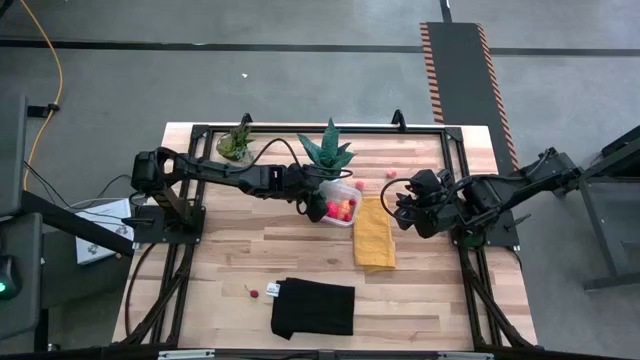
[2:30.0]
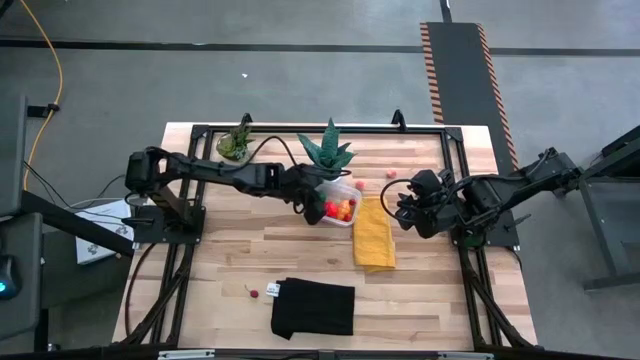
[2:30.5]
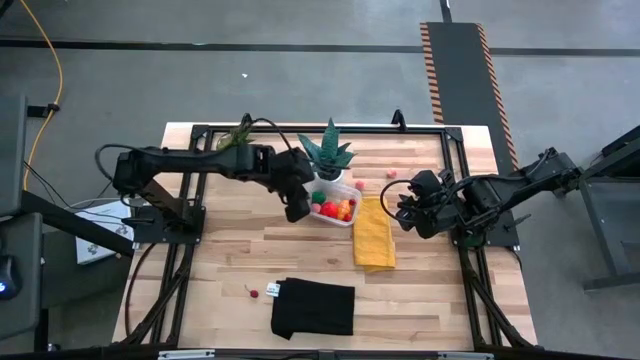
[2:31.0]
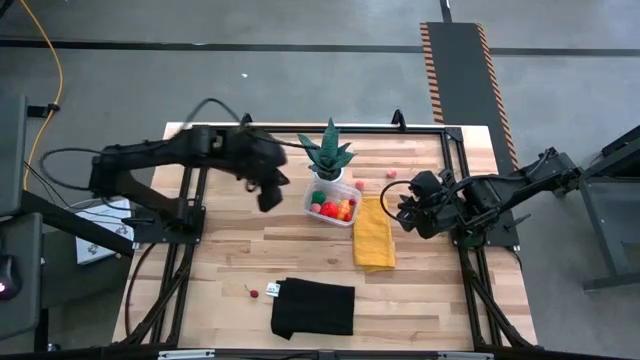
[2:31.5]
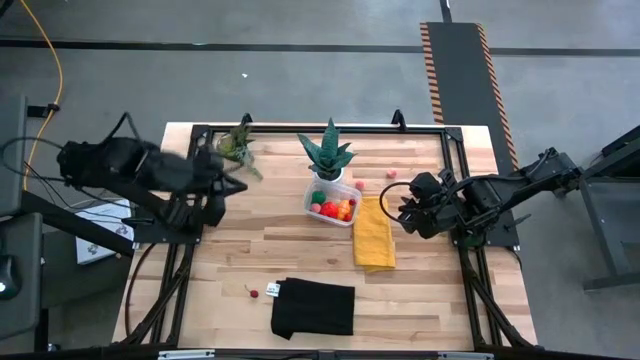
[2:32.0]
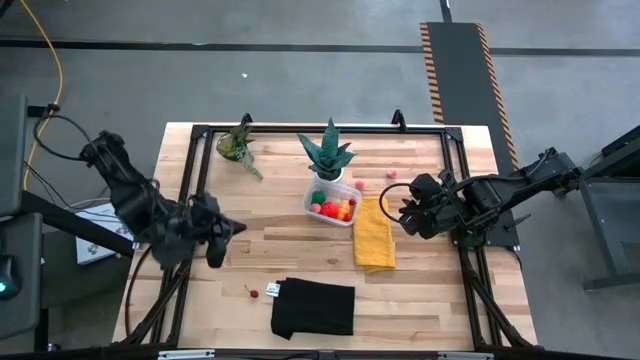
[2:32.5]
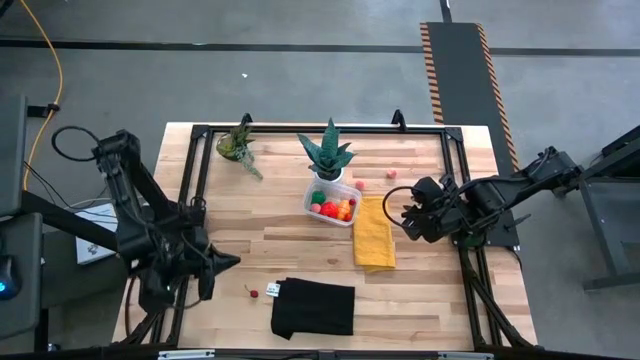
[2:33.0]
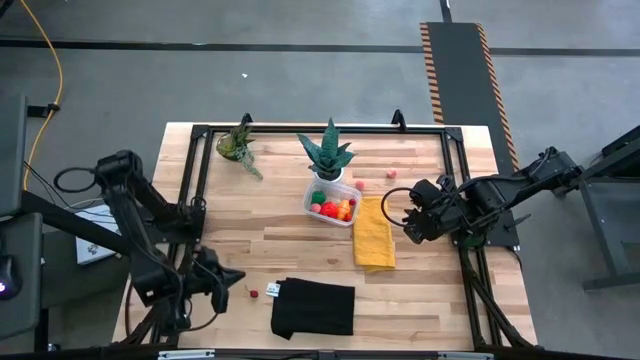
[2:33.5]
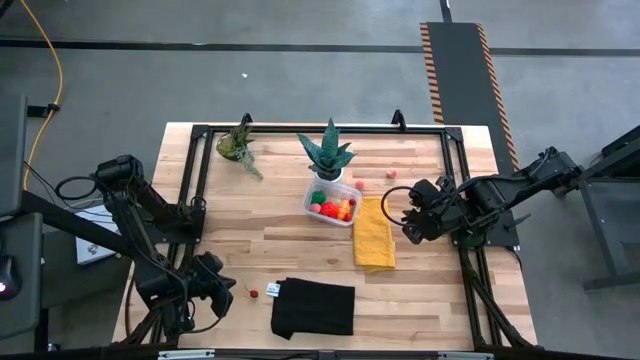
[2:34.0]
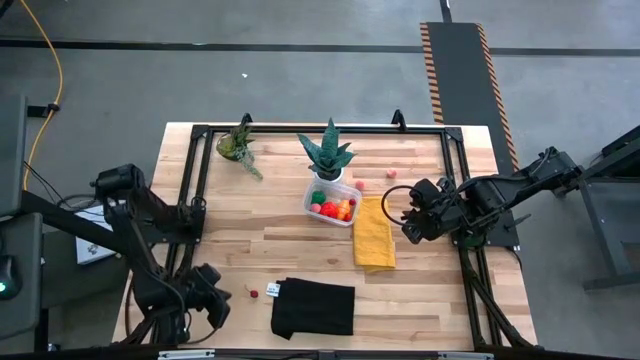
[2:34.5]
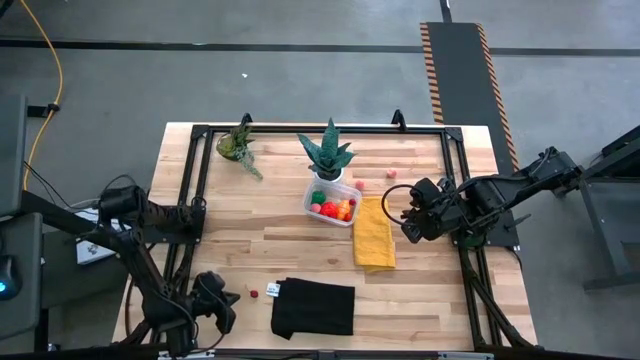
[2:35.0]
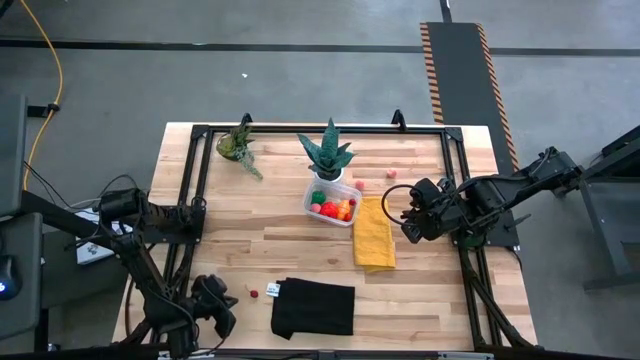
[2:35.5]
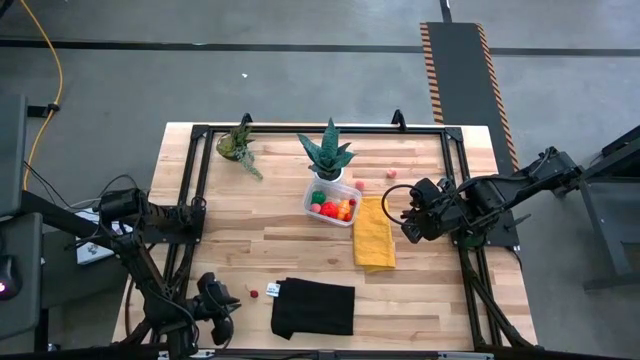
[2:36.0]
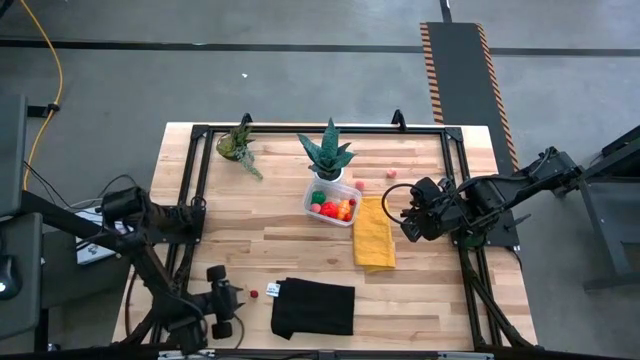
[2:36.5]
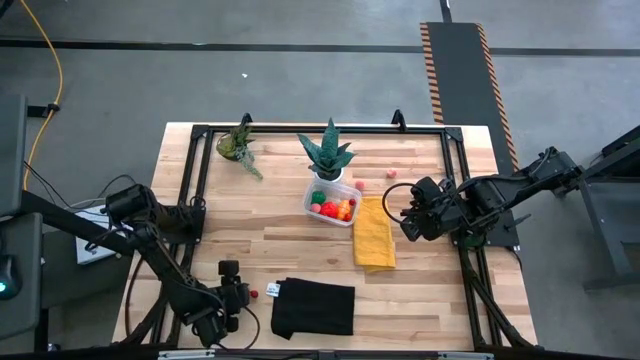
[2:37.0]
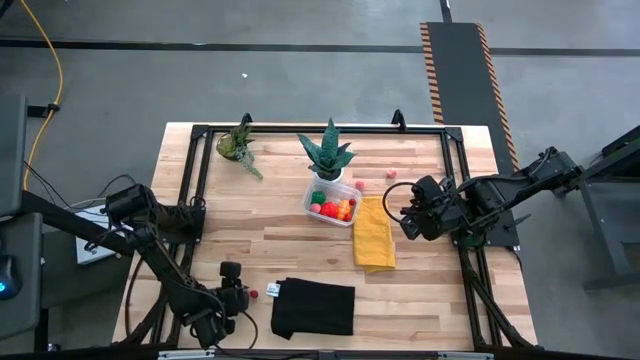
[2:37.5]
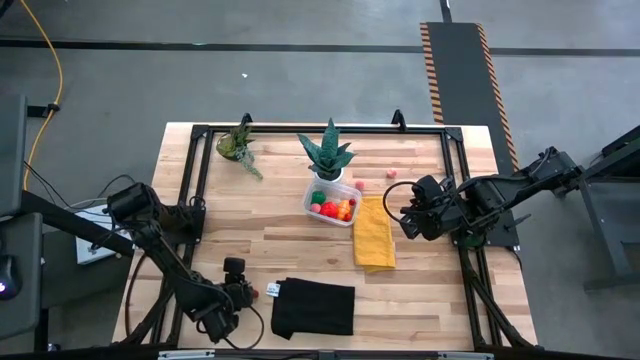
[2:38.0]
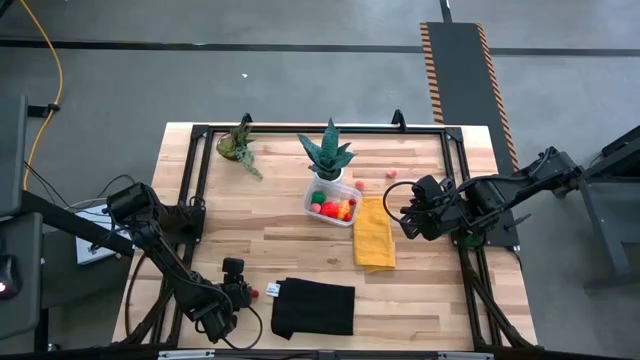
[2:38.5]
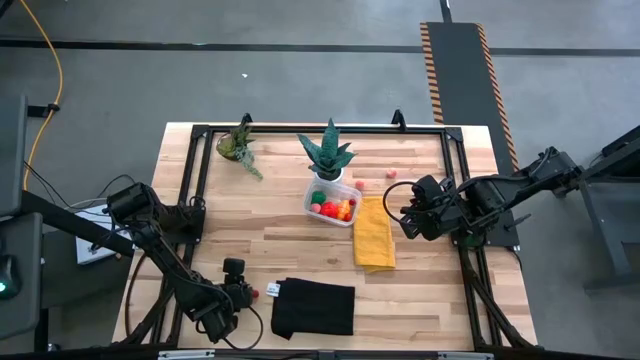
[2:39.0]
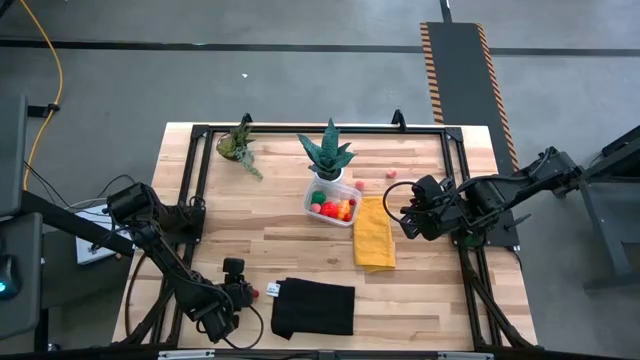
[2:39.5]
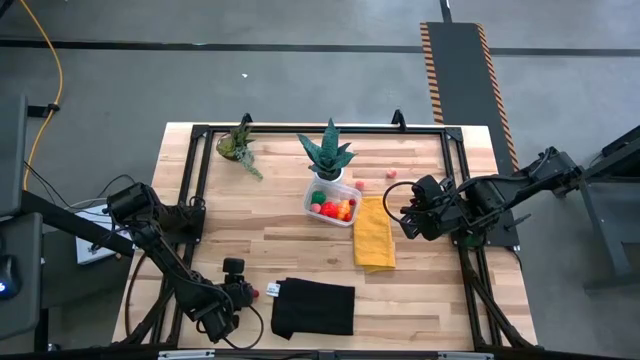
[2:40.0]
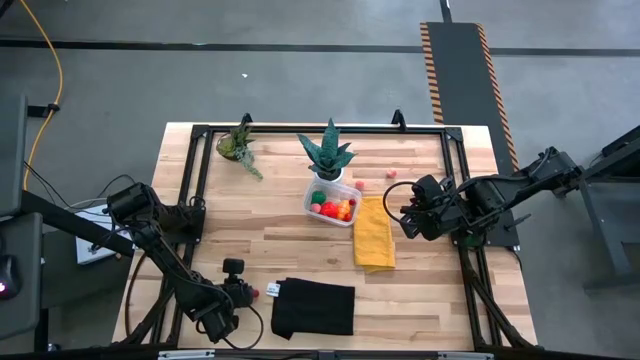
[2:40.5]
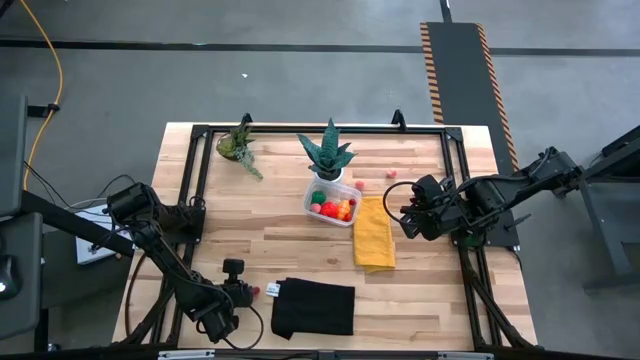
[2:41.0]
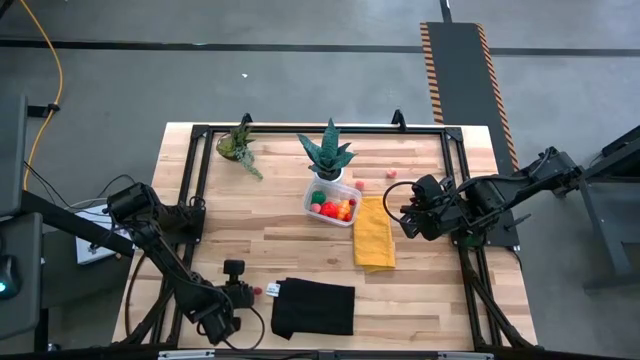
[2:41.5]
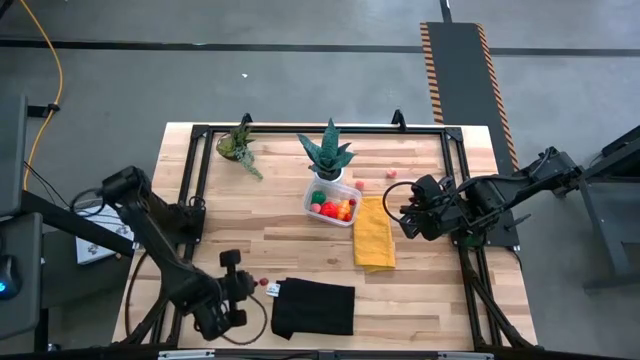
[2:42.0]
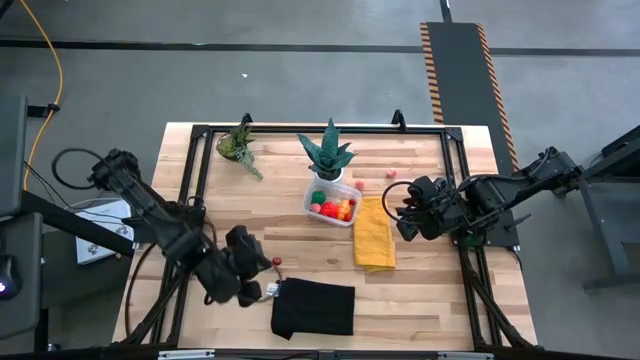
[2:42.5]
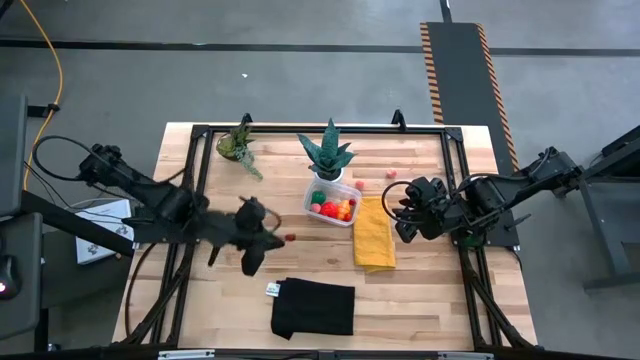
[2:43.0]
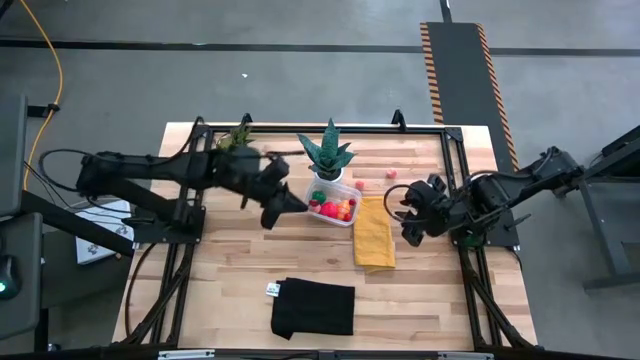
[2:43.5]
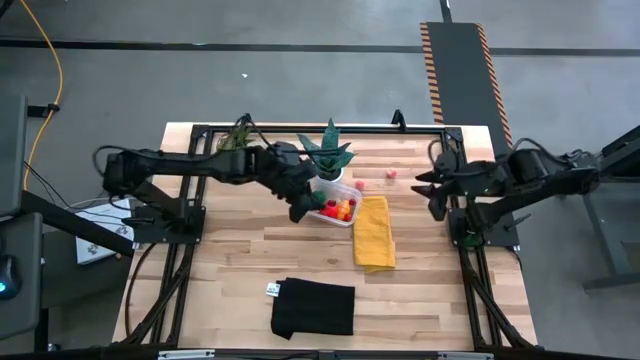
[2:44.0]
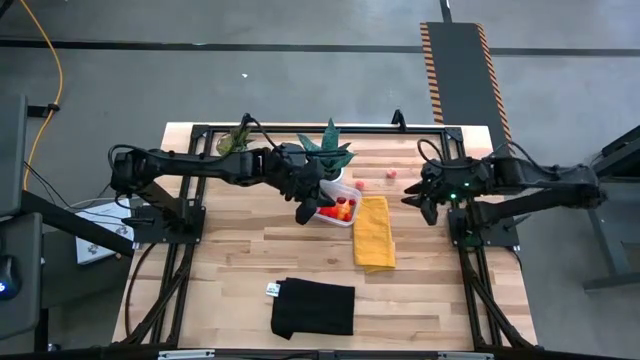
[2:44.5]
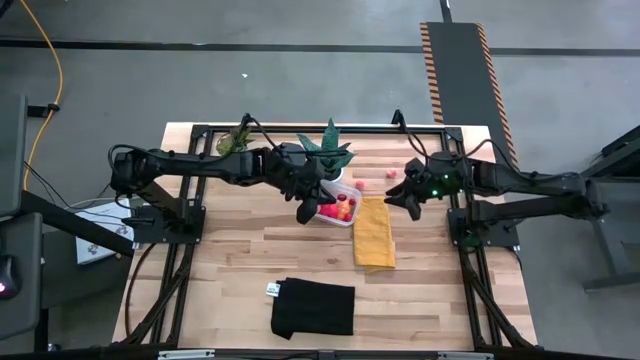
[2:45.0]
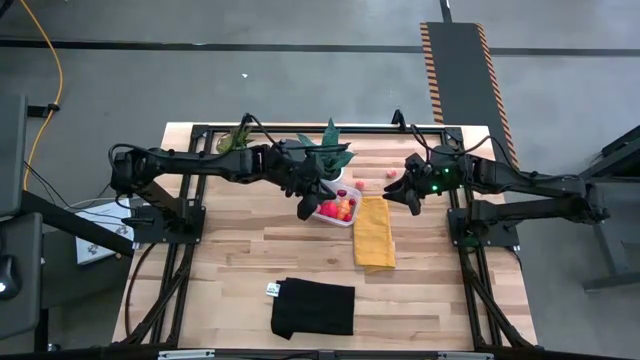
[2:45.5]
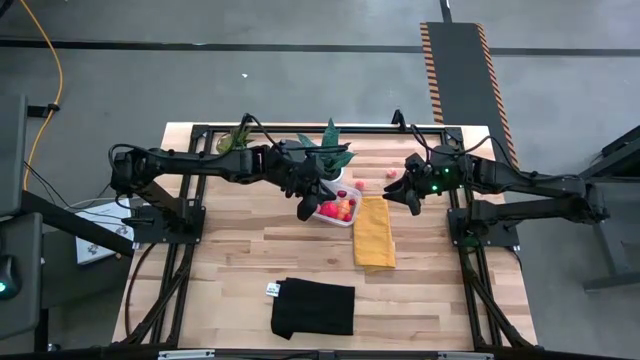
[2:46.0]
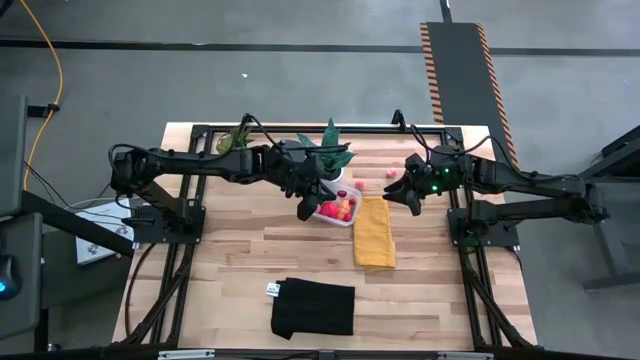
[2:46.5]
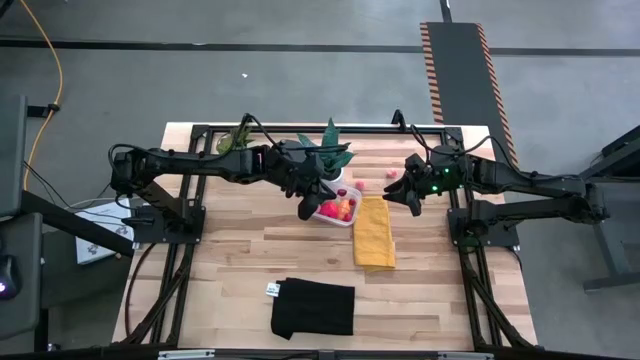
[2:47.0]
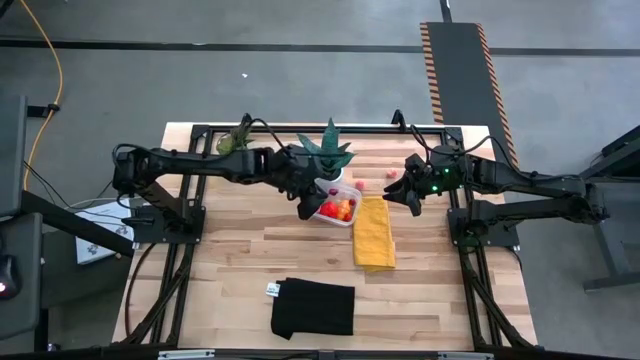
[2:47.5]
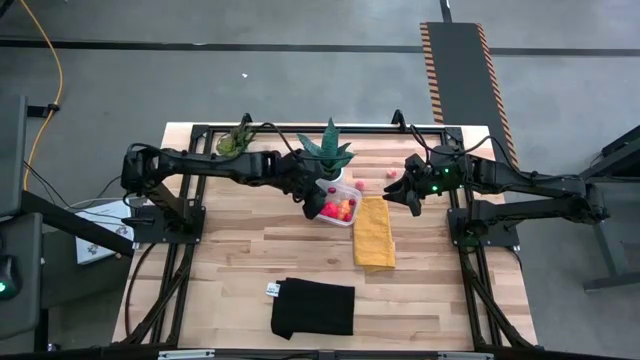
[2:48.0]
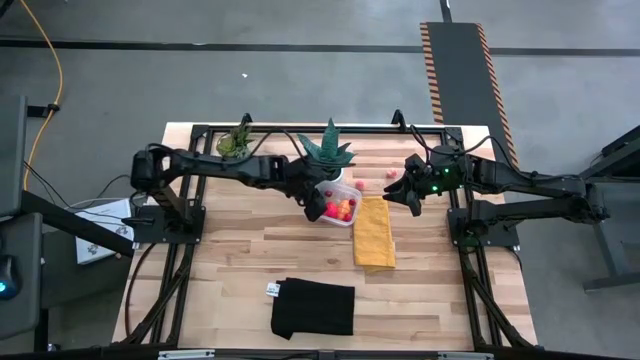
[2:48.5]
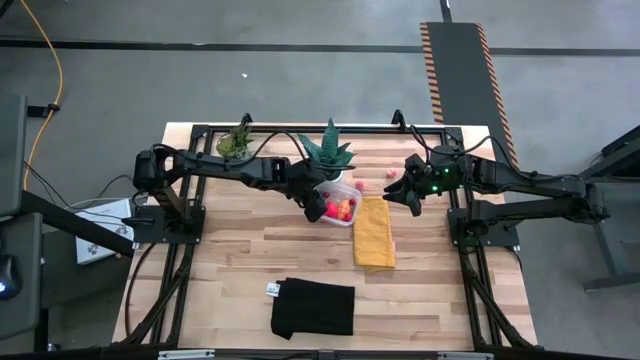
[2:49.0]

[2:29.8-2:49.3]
Task: Pick and placing Produce into tupperware
Put the red cherry into the transparent container

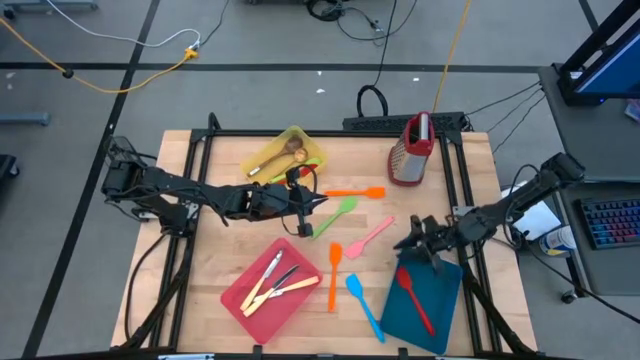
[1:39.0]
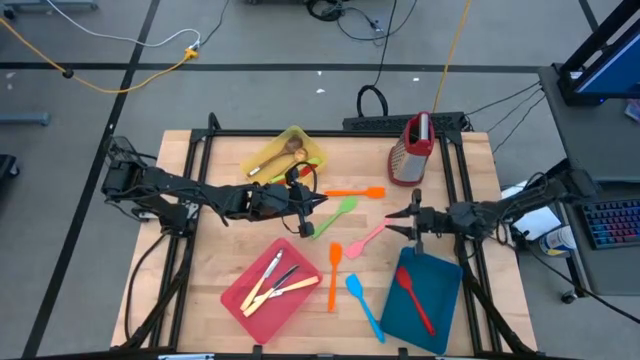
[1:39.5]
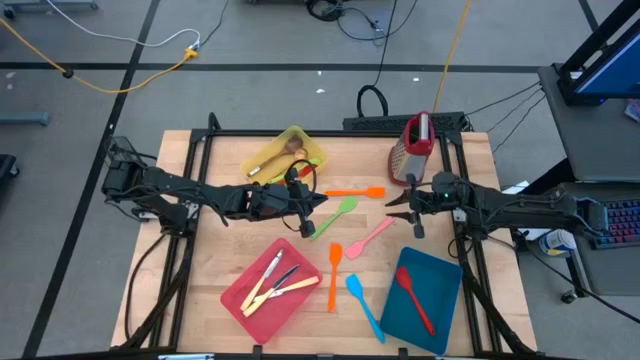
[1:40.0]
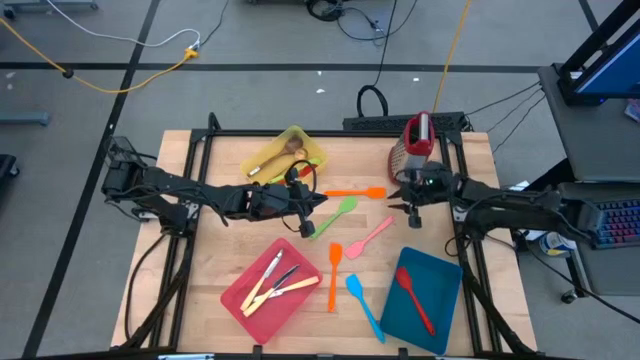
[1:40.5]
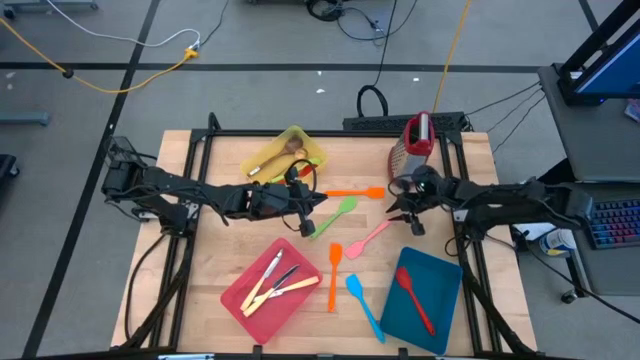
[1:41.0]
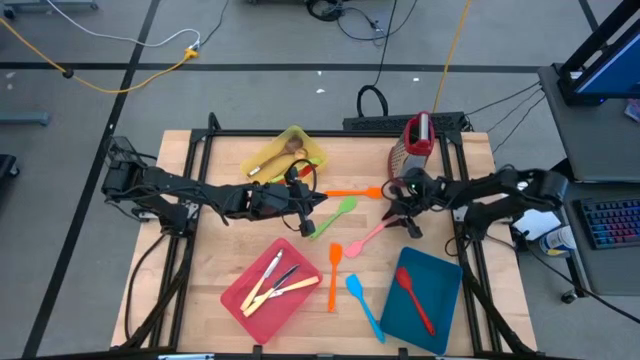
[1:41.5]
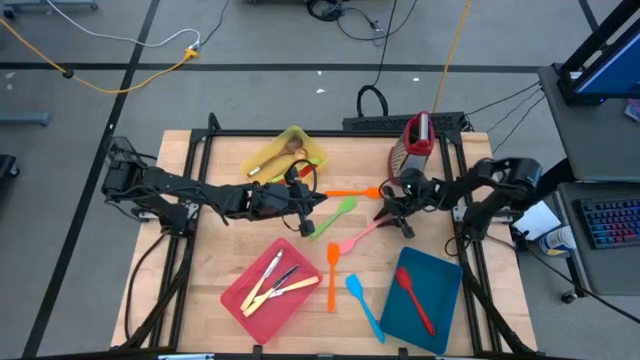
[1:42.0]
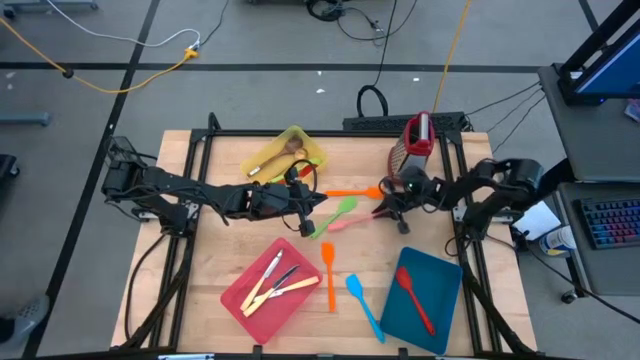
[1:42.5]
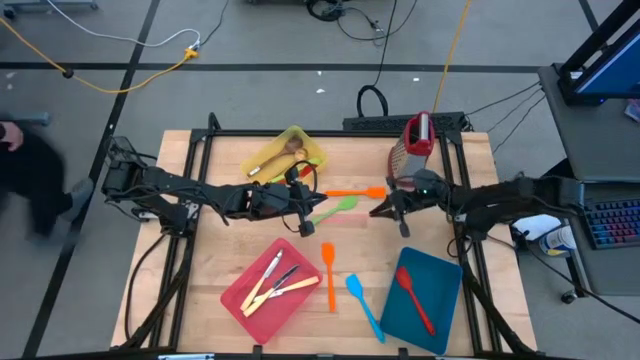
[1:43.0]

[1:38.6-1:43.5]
Task: Pick & Place Kitchen Items
Put the pink spatula into the blue bin
